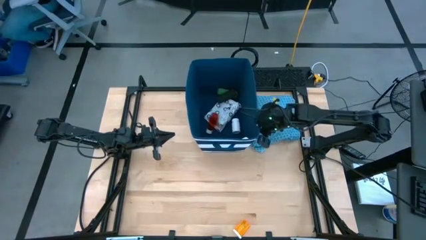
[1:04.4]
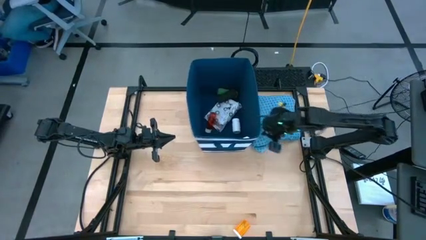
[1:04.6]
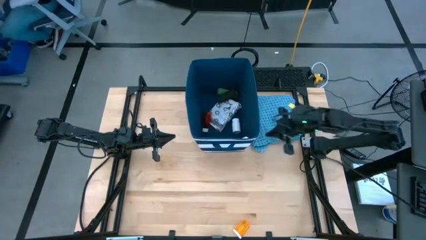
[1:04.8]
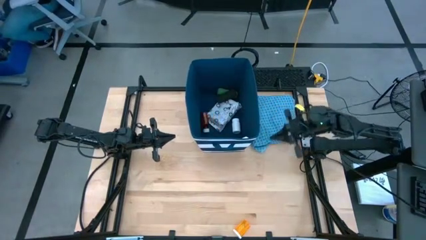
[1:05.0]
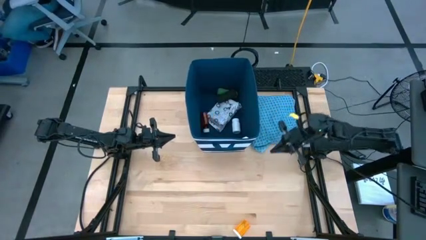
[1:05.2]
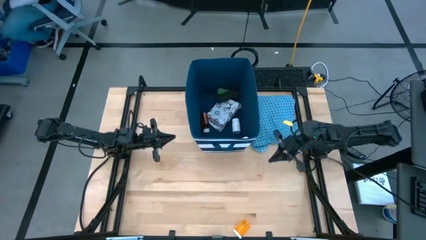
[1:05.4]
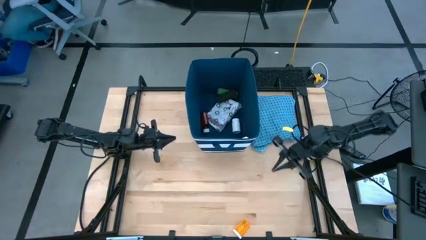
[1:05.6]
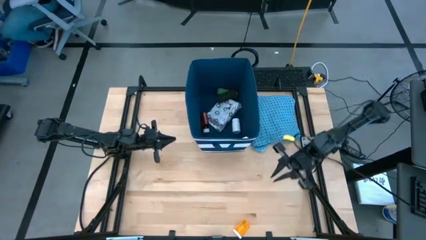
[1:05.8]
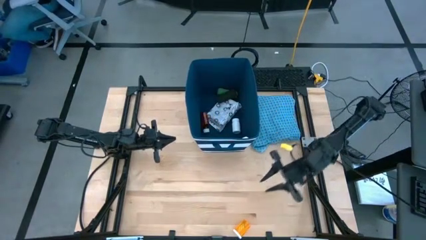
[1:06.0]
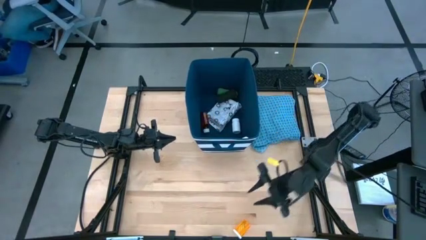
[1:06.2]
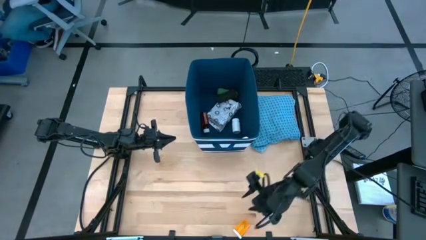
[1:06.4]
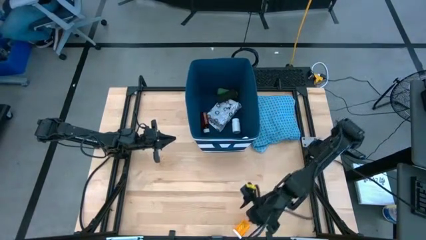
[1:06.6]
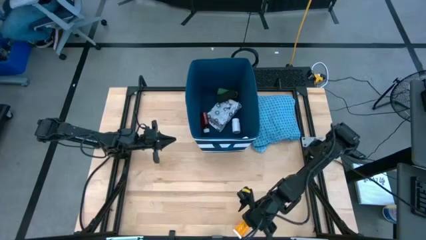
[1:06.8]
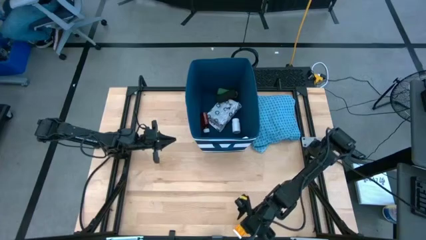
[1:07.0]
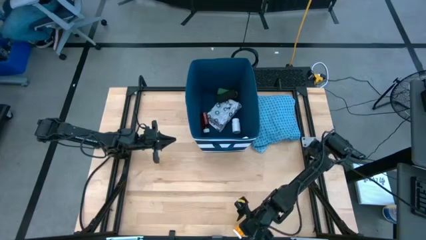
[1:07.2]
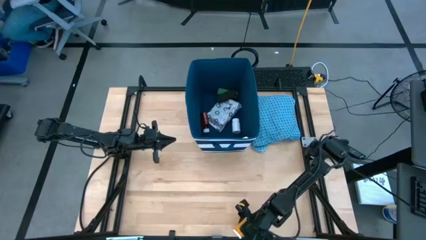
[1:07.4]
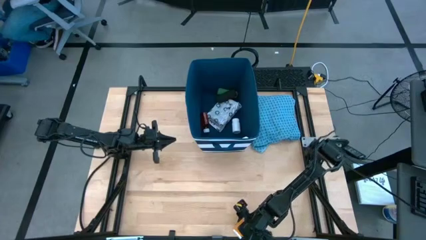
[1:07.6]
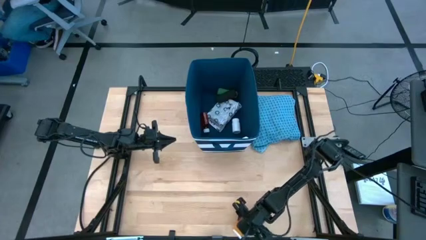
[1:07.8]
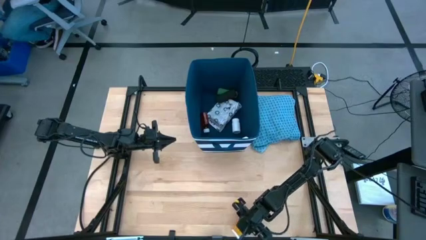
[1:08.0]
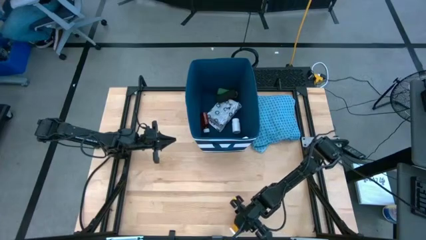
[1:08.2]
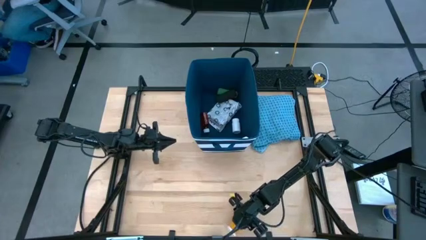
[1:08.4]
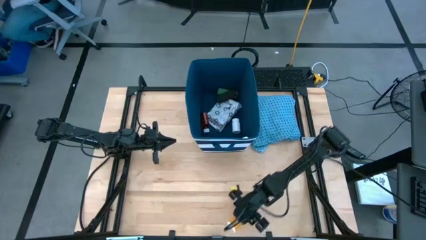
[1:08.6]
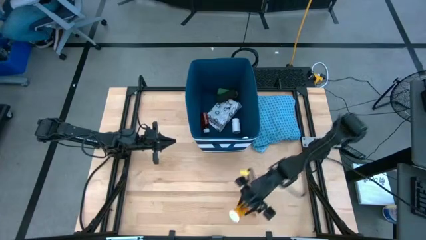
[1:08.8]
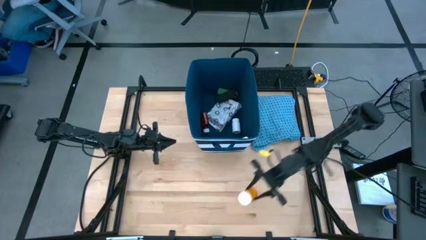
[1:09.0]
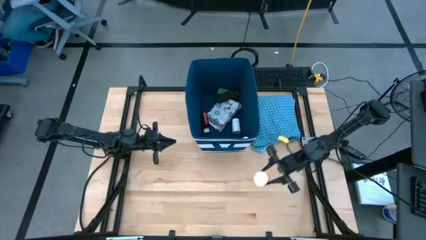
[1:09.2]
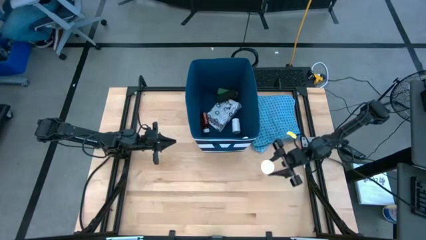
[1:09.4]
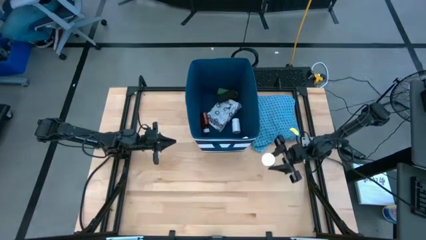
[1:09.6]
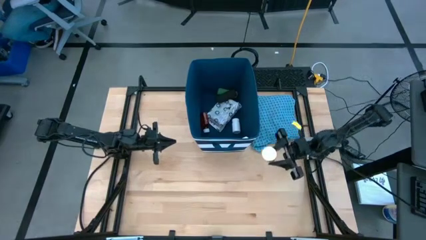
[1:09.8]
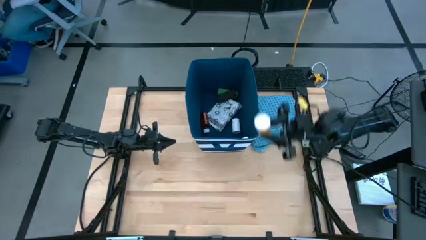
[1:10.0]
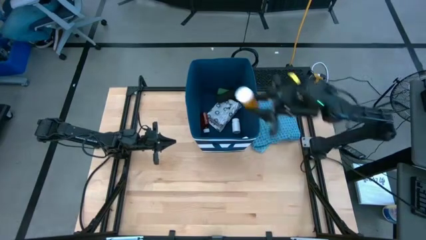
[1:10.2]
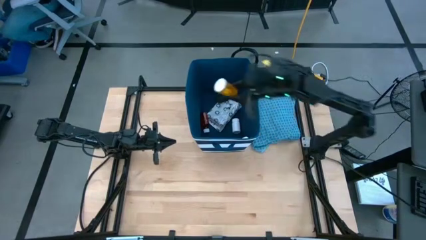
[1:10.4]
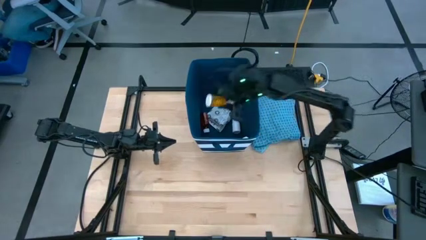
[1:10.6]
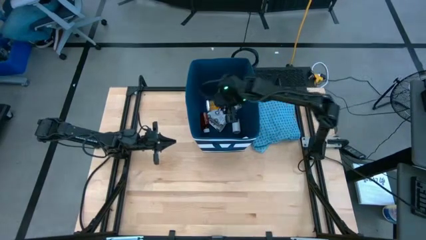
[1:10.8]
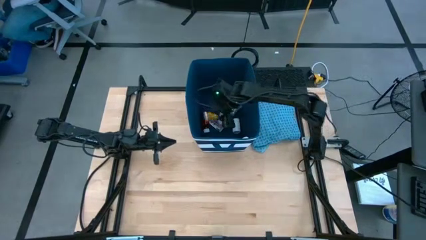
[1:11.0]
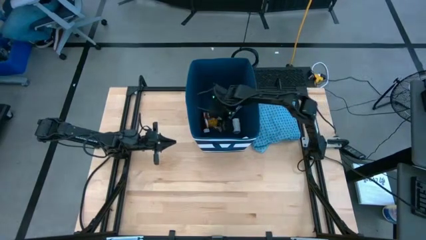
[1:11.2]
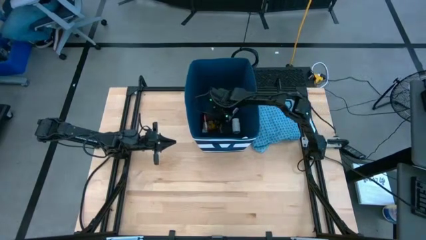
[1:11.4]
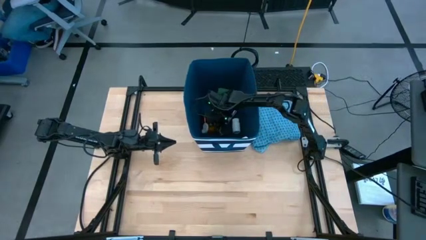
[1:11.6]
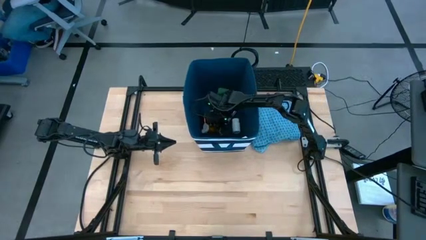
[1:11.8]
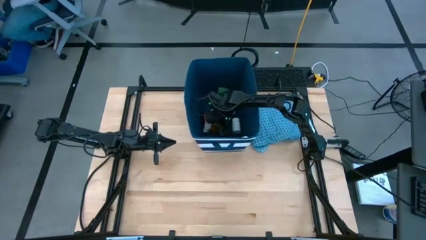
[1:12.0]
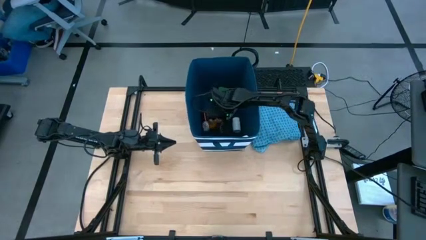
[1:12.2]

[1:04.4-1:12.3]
Task: Pick & place medical supplies in basket/bin
Put the orange pill bottle into the blue bin

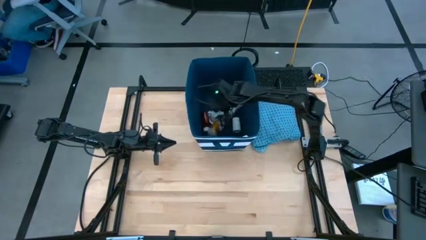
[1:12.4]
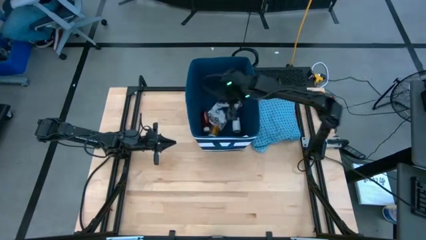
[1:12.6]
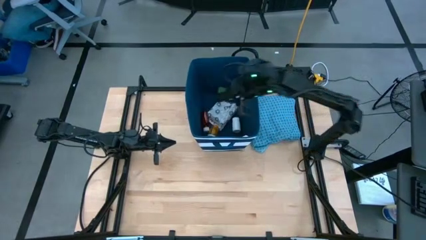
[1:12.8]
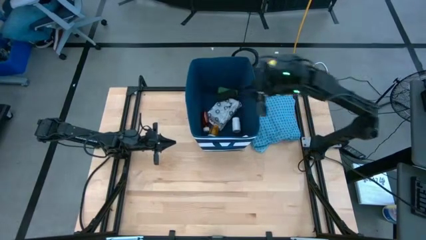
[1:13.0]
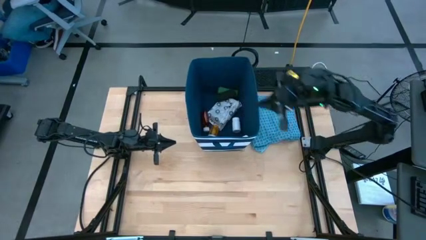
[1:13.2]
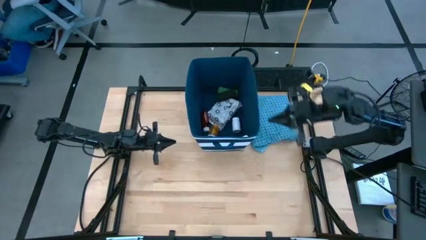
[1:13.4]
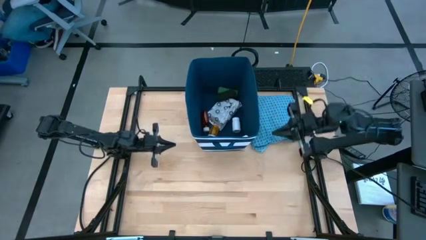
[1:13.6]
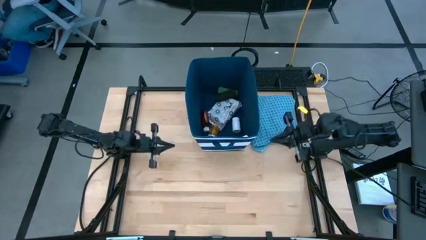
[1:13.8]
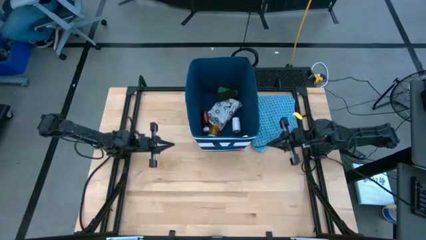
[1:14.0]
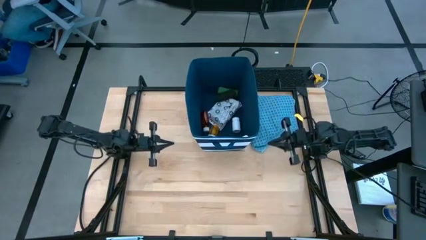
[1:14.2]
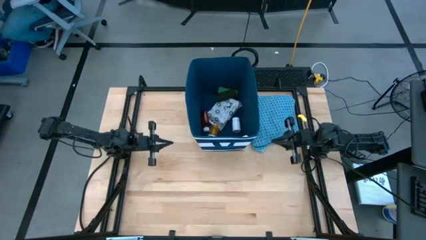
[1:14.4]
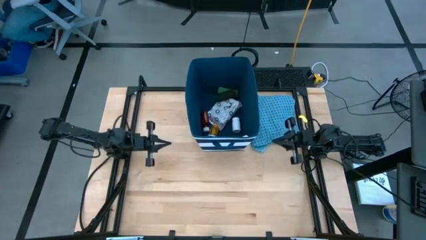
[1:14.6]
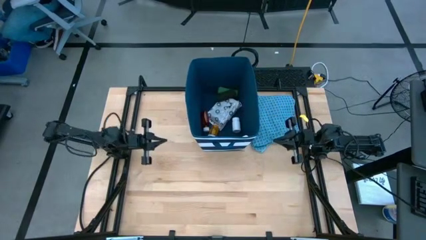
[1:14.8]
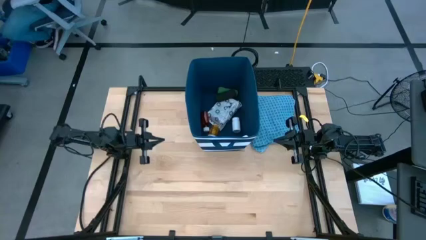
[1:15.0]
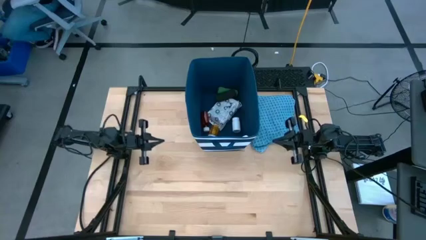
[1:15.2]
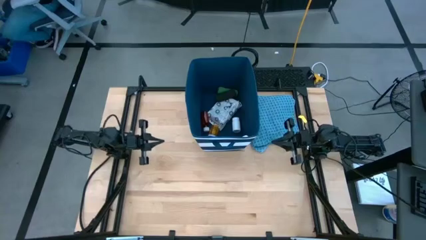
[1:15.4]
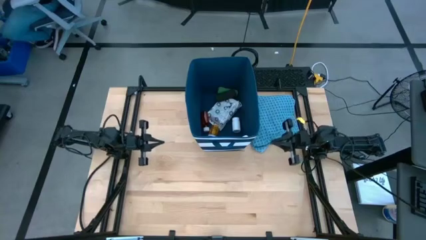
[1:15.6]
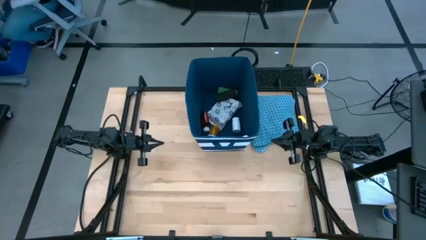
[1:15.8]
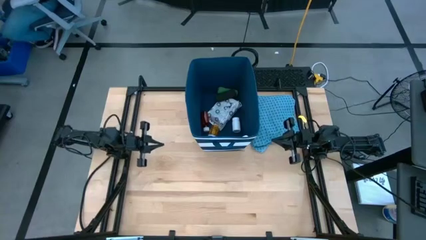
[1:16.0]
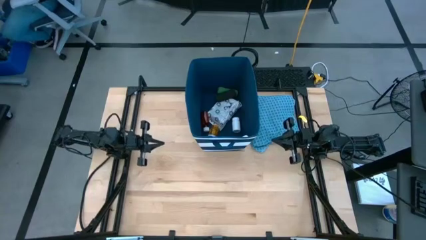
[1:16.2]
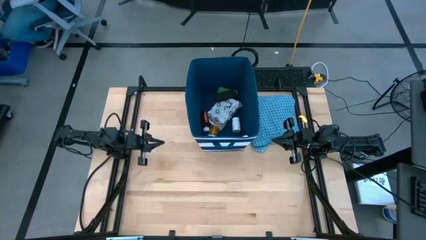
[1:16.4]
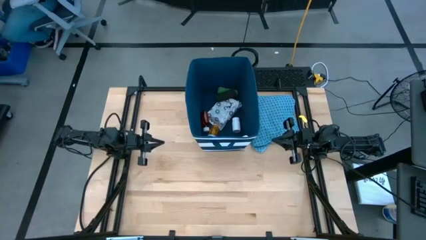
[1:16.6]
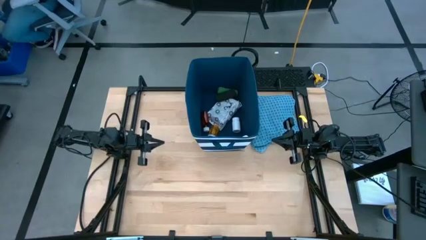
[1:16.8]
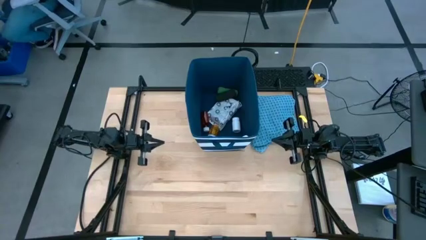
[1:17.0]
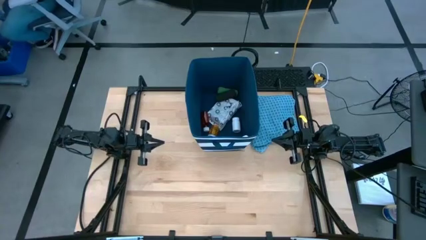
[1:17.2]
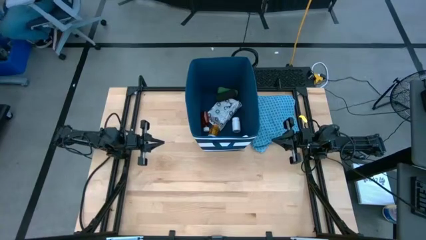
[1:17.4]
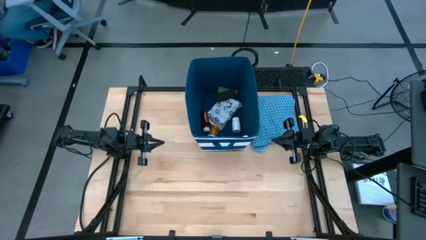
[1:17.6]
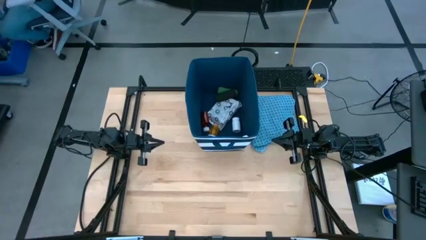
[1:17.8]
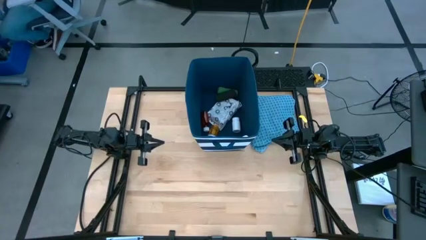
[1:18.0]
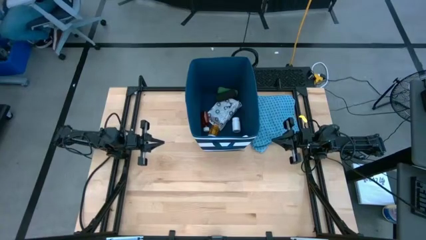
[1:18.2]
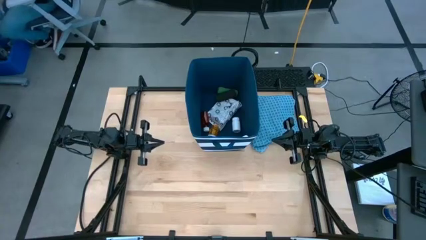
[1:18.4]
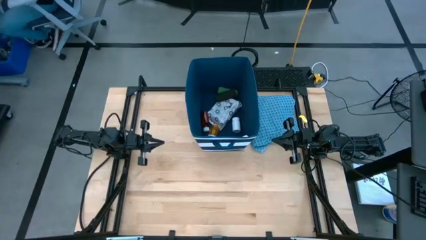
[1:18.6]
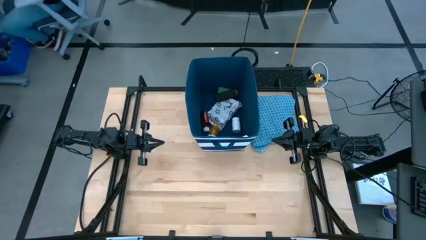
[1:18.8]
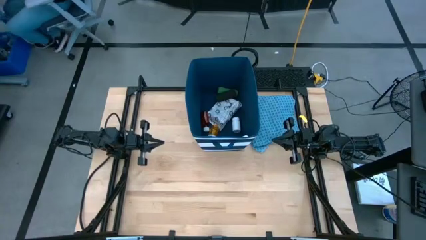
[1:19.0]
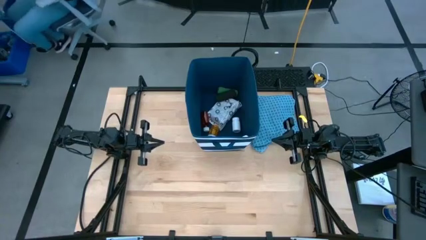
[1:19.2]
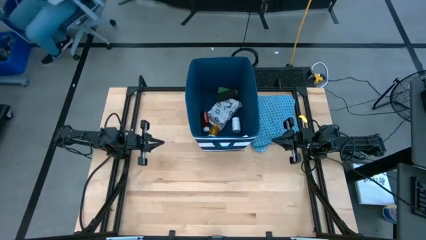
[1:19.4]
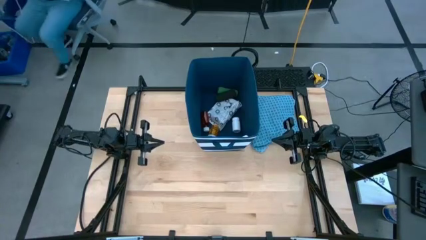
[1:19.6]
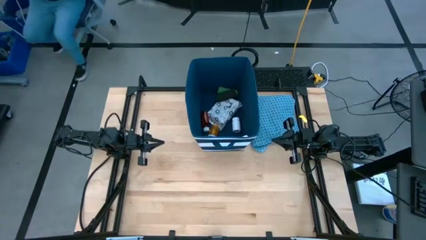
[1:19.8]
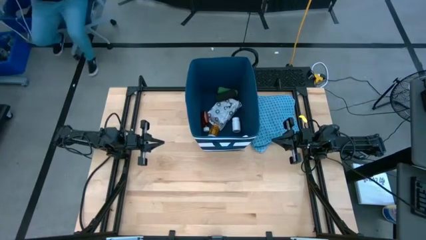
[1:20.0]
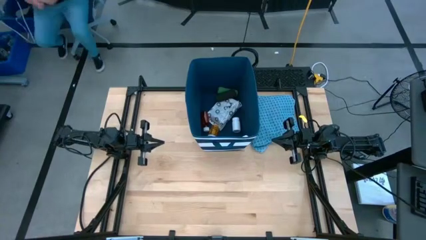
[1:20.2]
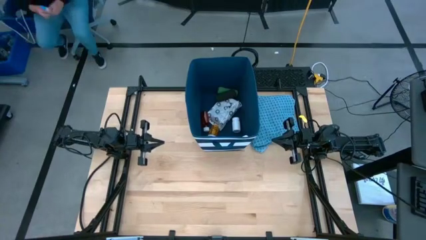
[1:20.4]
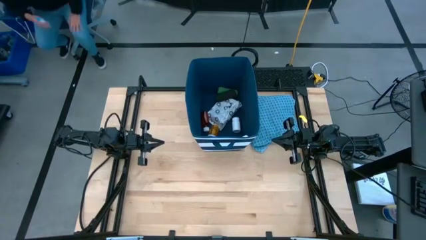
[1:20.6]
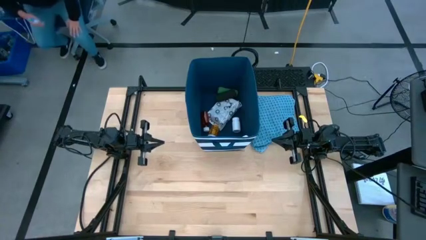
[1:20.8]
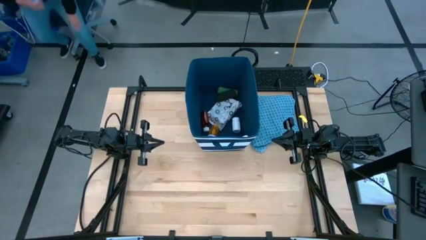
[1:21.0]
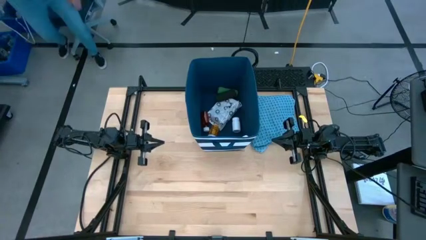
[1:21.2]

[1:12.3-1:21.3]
Return to Home Position
